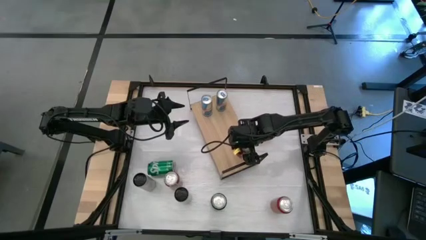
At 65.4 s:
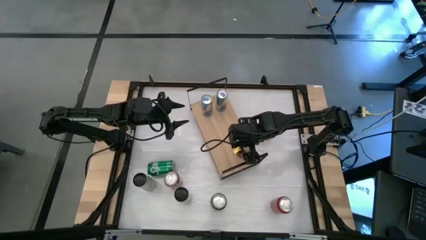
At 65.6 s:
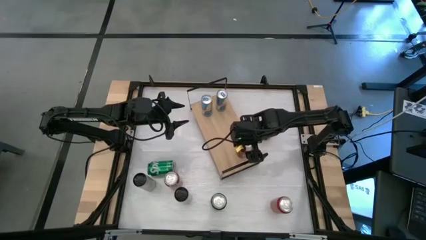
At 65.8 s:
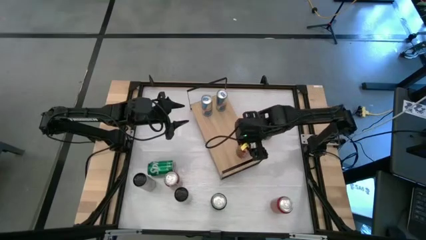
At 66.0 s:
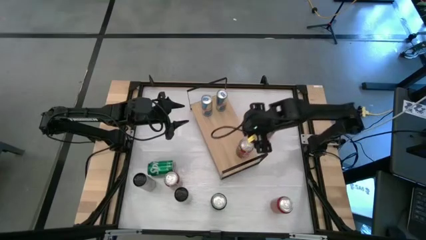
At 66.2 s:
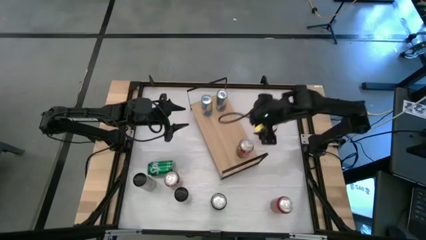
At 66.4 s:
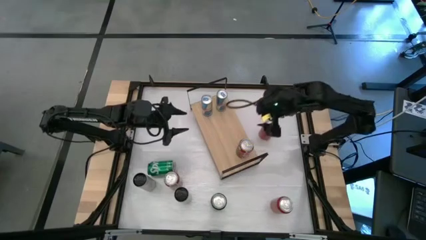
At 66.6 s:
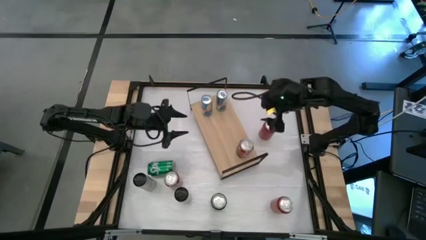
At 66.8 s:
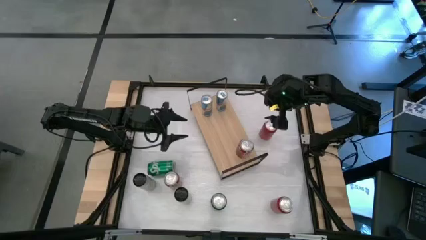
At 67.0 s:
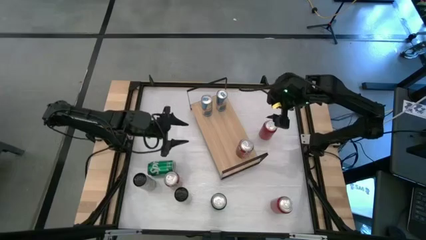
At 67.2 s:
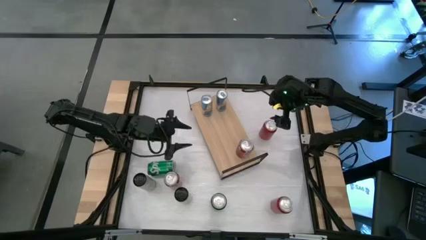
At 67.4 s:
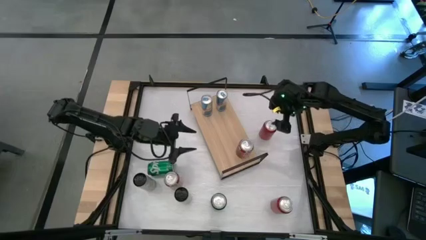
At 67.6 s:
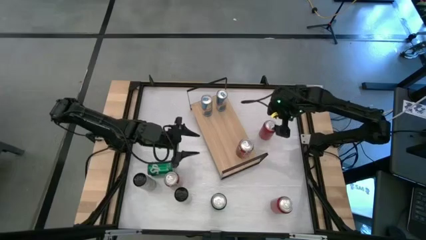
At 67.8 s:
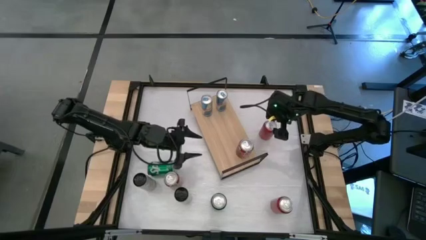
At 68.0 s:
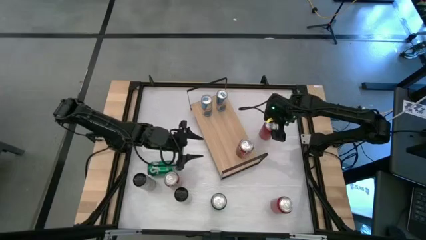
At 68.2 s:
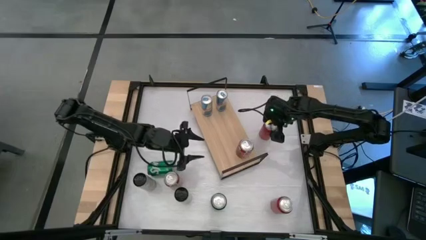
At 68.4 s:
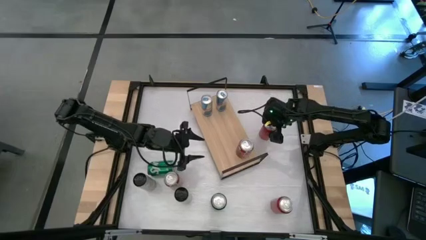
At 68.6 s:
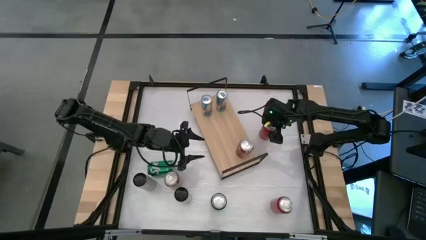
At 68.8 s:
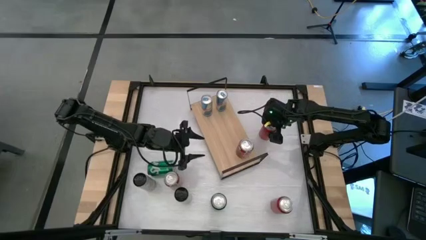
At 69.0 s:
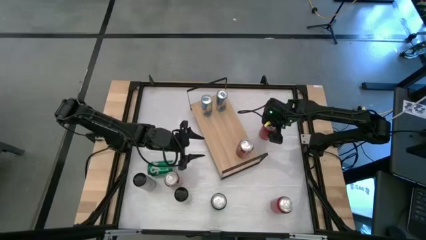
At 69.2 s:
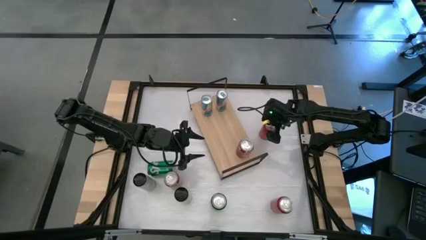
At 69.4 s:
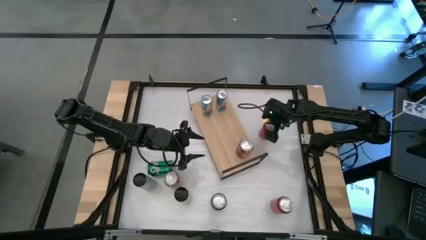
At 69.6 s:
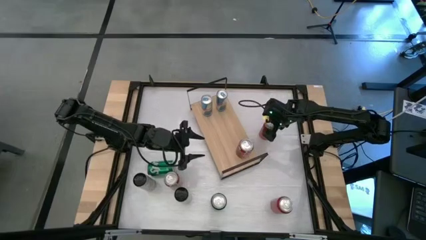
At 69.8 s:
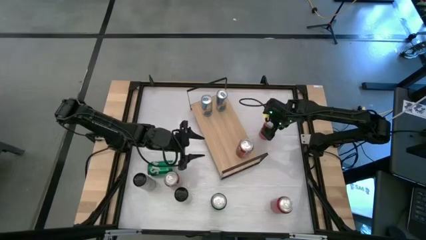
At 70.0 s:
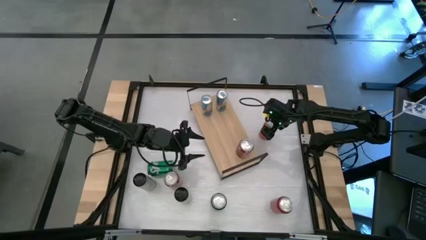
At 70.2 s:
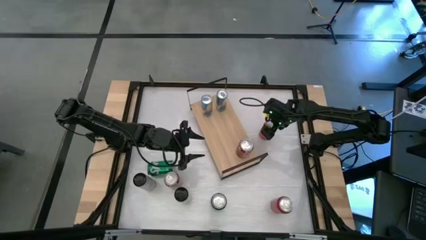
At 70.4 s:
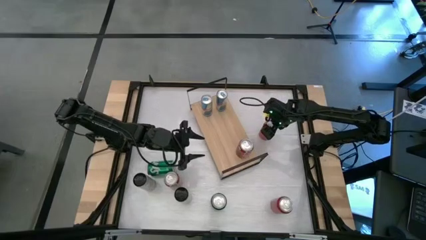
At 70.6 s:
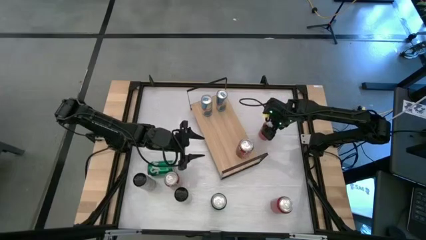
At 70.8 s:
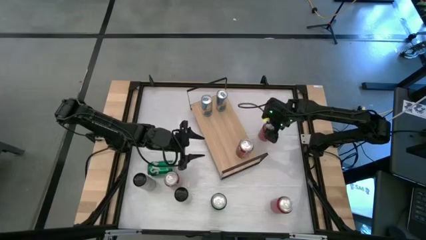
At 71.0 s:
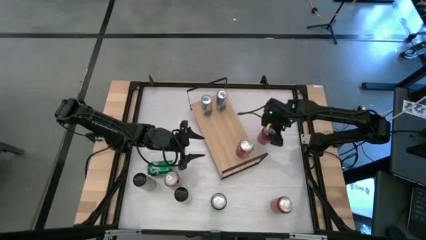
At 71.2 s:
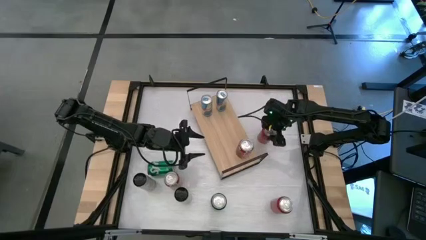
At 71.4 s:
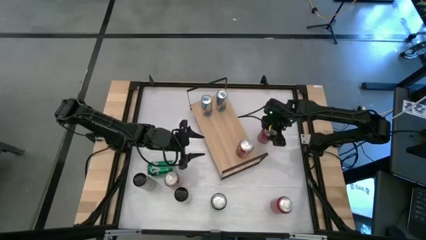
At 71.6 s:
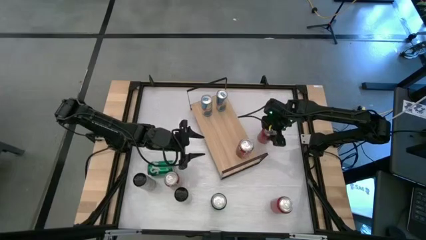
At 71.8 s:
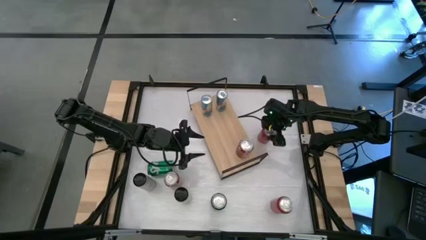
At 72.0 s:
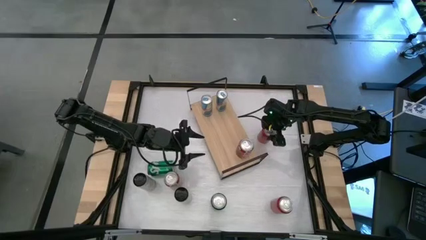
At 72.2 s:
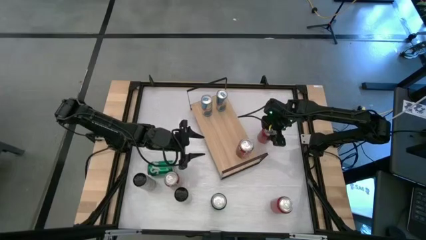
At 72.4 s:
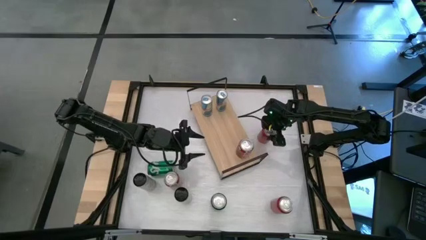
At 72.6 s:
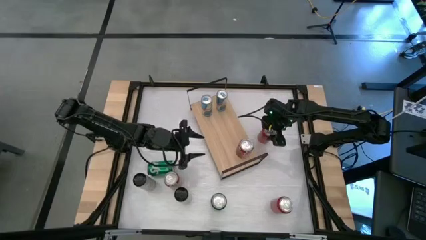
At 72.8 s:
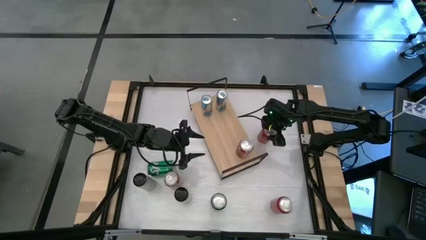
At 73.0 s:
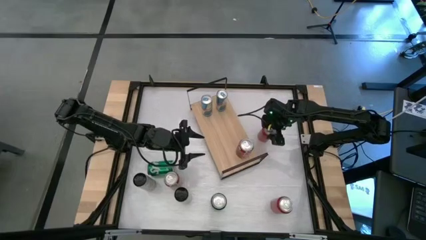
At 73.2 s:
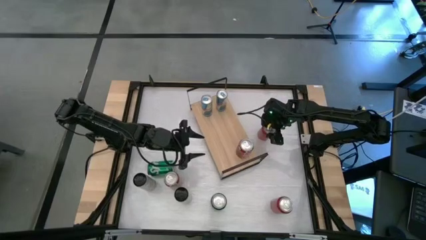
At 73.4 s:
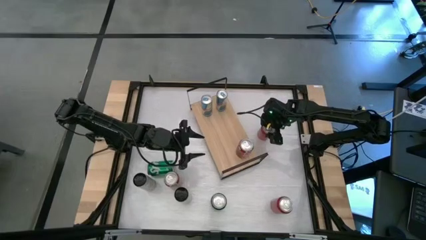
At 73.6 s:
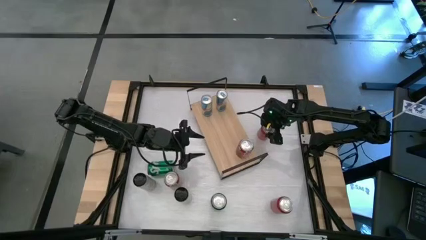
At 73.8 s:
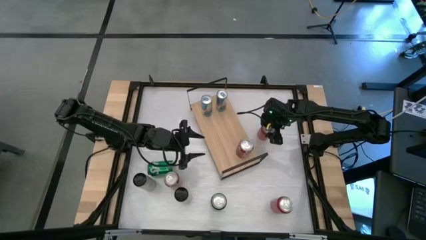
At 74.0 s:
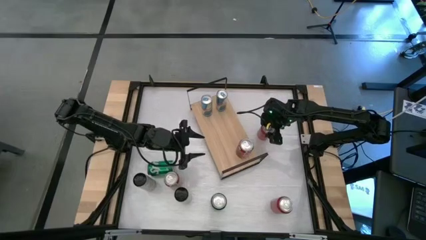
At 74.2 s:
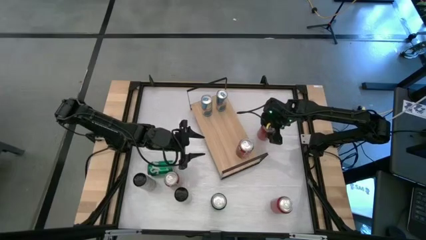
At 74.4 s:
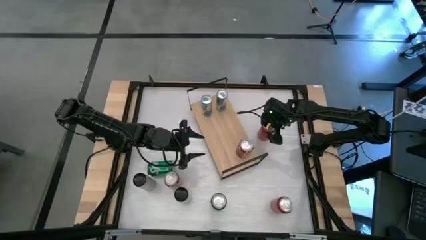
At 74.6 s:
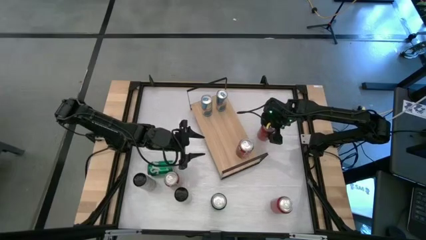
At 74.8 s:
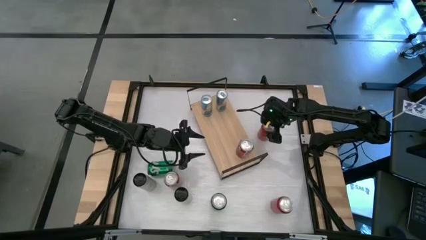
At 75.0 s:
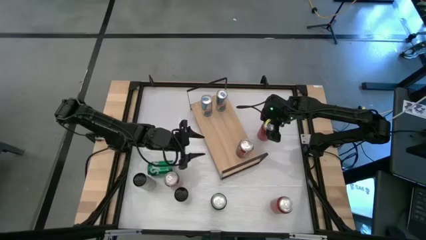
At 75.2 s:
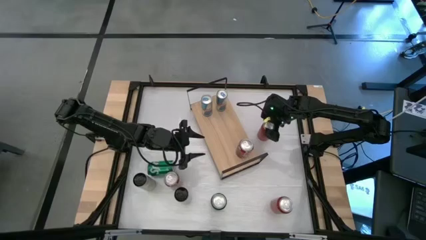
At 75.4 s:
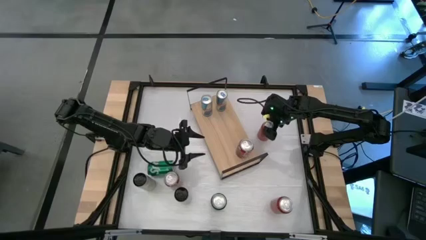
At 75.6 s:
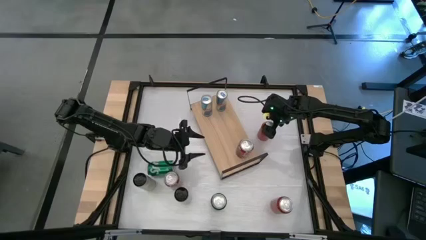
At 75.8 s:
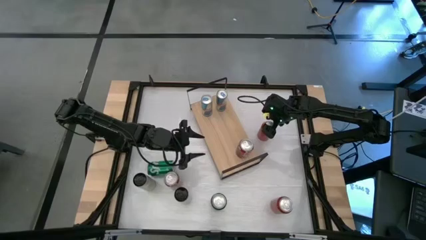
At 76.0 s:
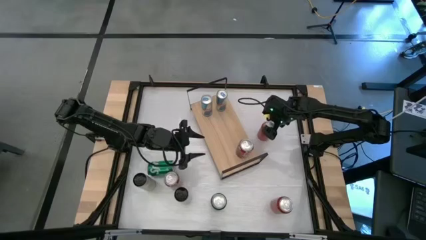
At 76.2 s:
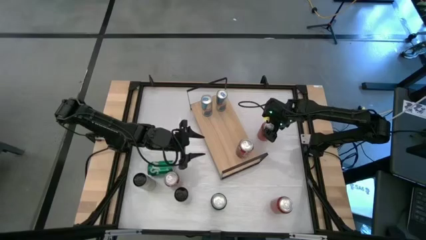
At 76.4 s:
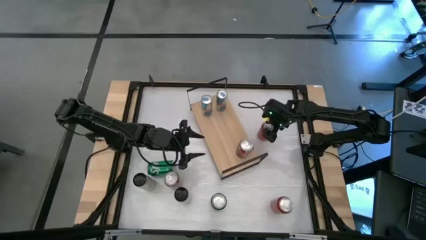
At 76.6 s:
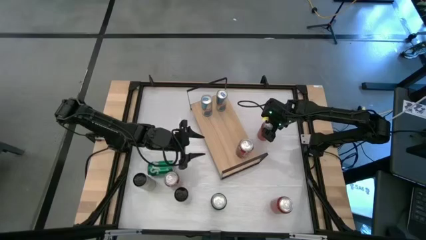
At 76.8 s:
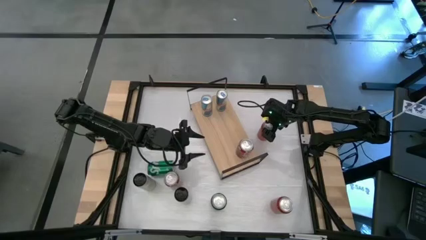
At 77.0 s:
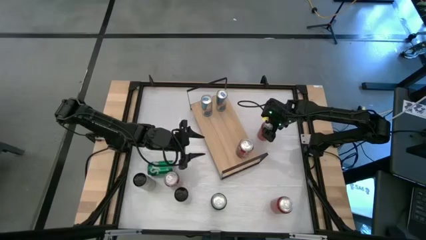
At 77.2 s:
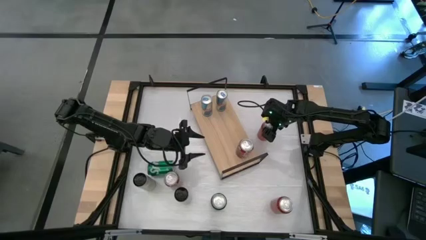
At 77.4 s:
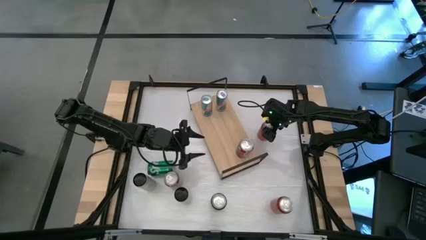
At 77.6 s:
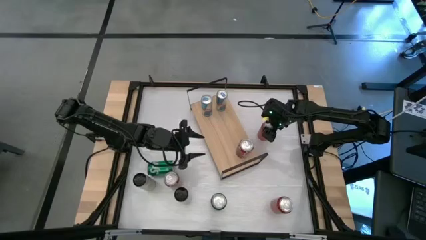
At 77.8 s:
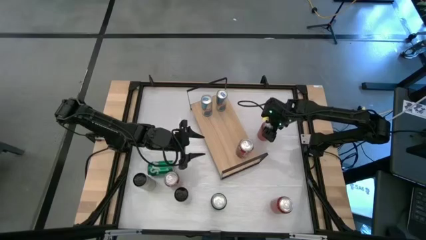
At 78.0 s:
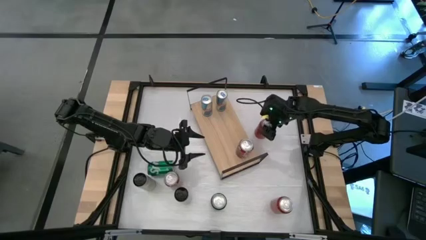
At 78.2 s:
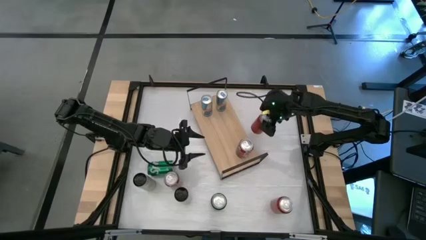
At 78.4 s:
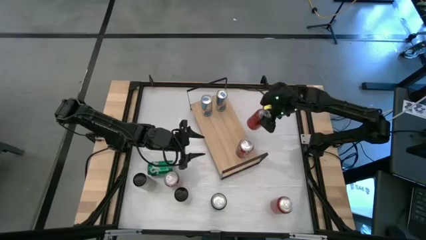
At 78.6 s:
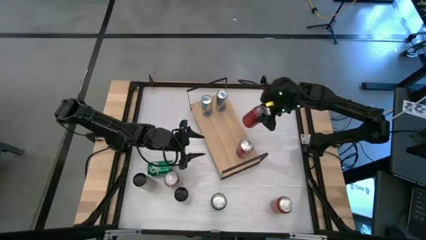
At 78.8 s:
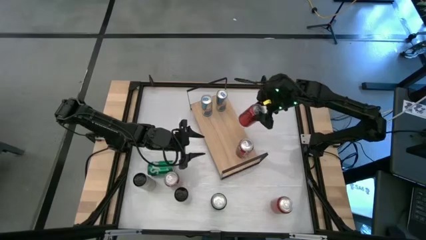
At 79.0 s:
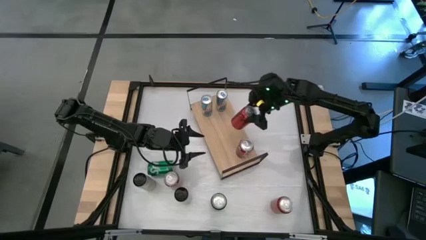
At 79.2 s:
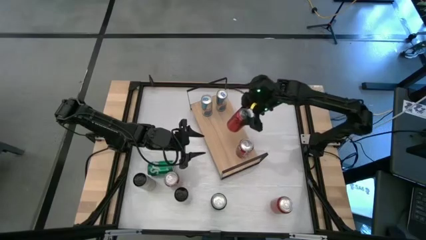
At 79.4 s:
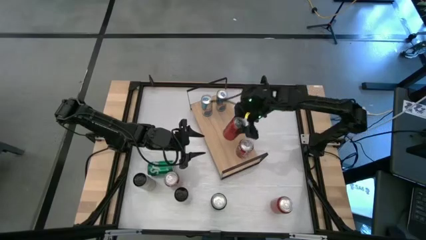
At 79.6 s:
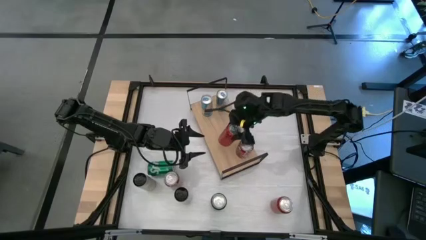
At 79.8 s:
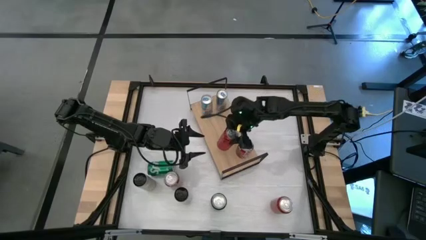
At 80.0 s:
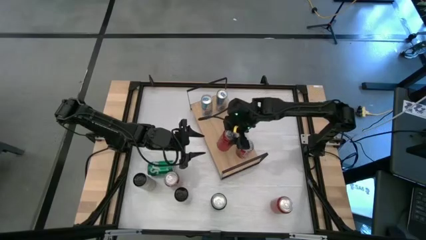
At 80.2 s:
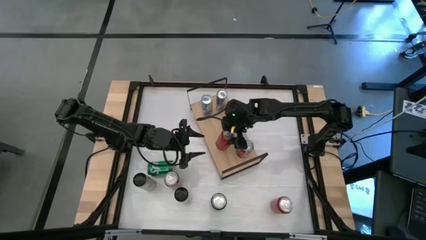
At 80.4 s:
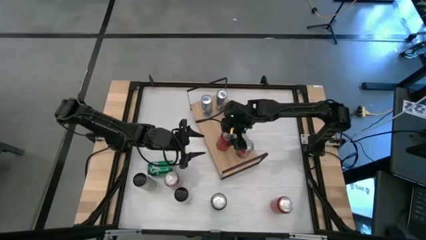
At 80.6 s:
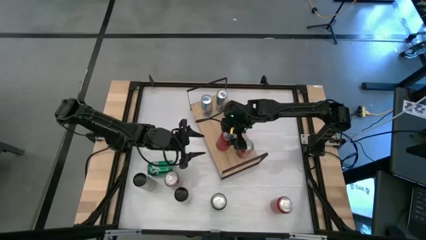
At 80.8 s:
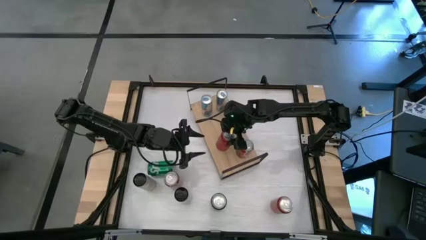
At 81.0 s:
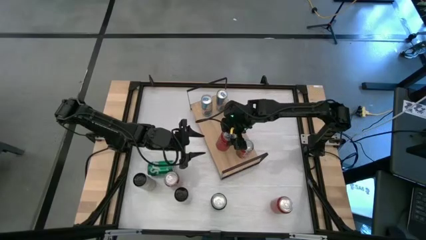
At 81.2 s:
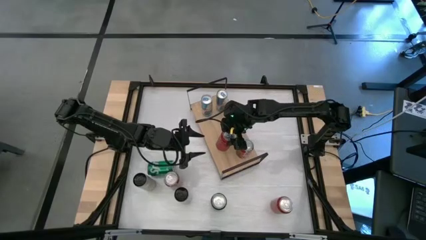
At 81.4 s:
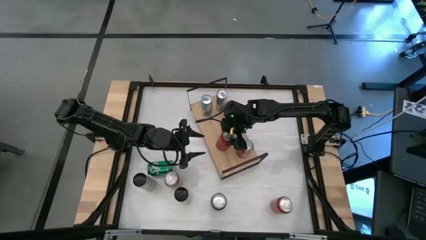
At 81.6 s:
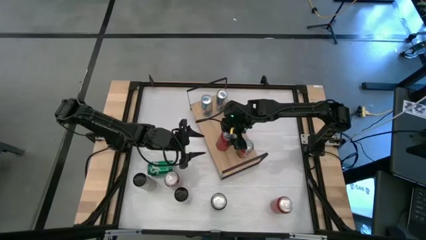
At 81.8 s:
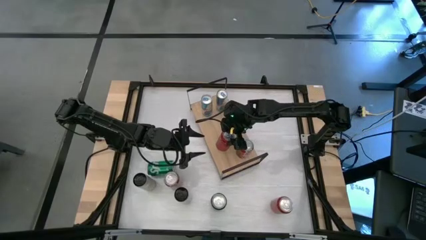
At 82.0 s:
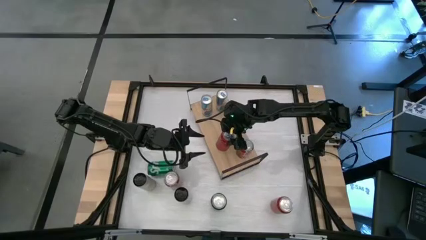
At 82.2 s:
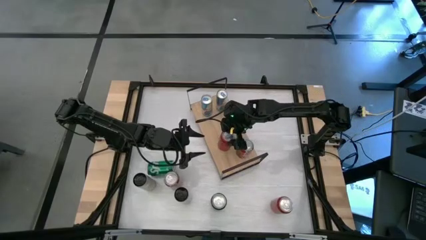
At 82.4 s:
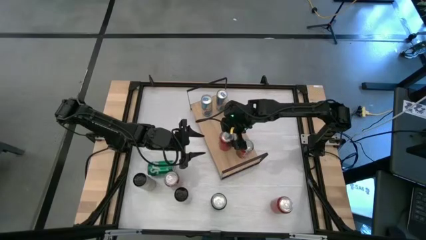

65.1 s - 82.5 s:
Task: Place canned beverage on shelf
Put the top red-black soda can on the shelf
